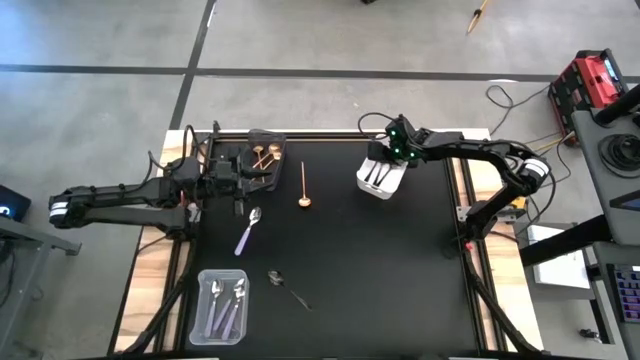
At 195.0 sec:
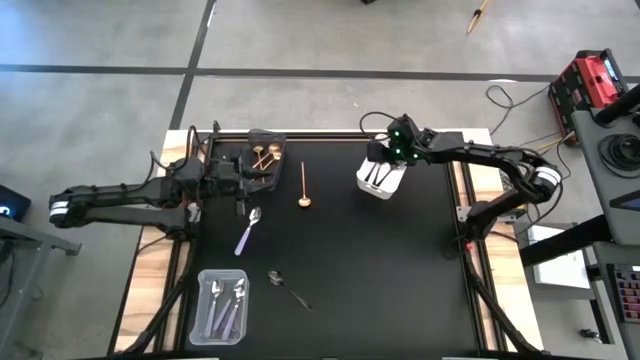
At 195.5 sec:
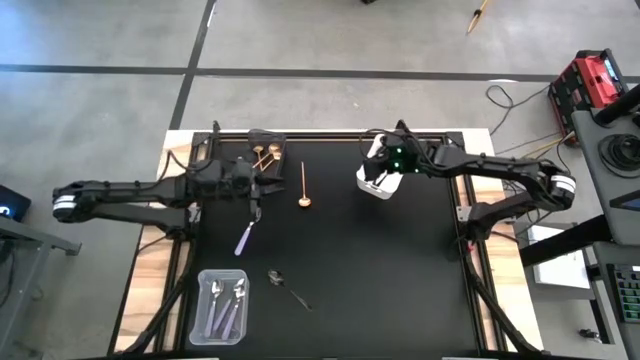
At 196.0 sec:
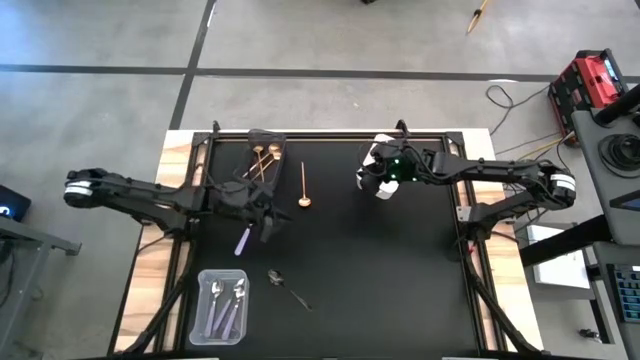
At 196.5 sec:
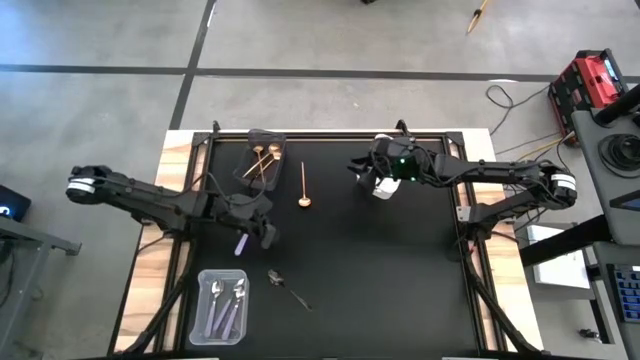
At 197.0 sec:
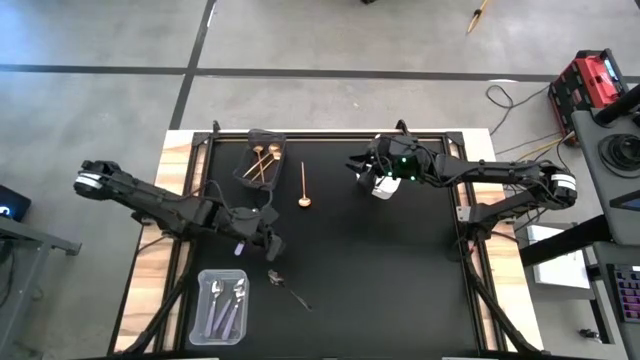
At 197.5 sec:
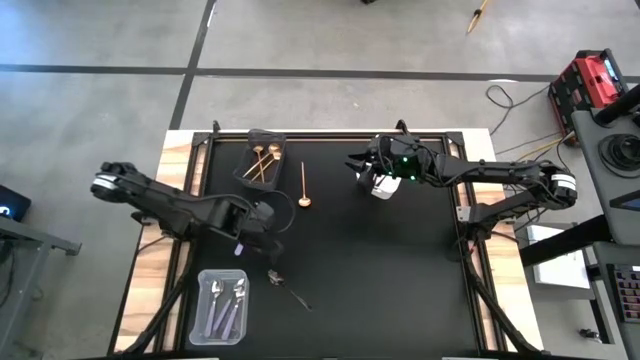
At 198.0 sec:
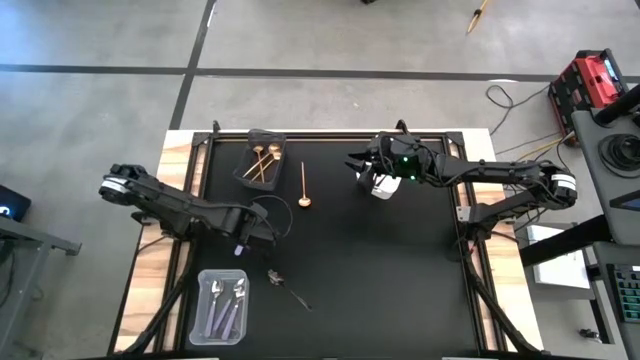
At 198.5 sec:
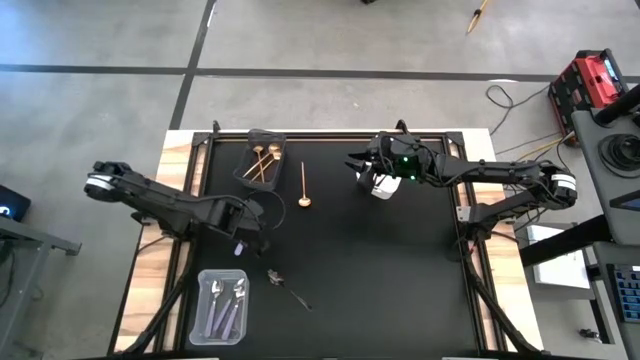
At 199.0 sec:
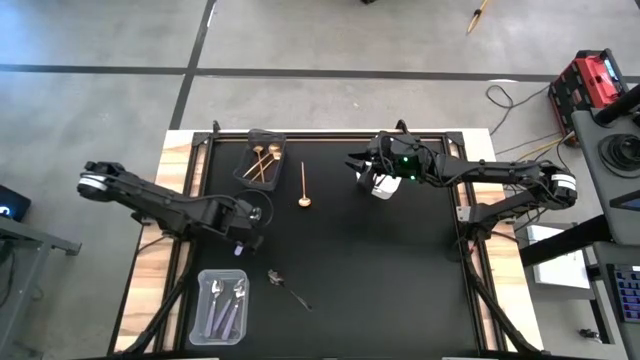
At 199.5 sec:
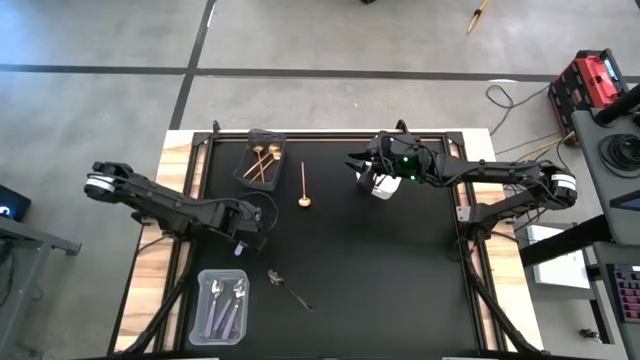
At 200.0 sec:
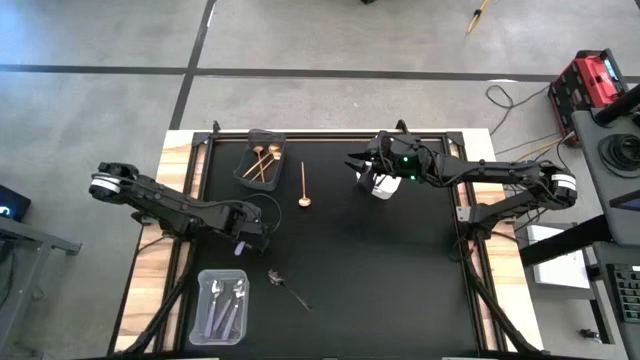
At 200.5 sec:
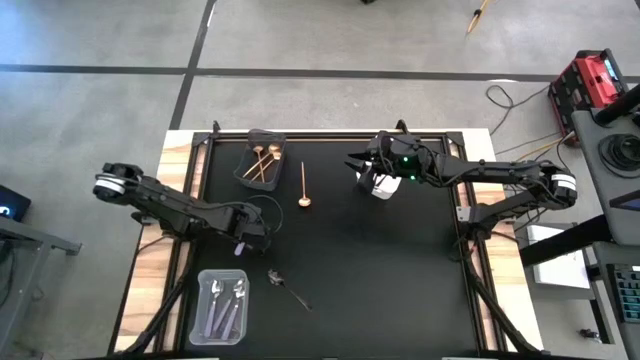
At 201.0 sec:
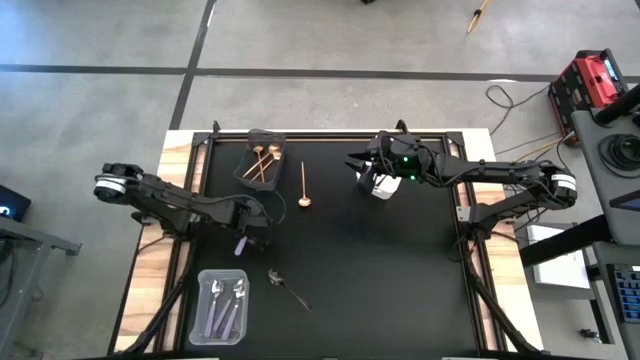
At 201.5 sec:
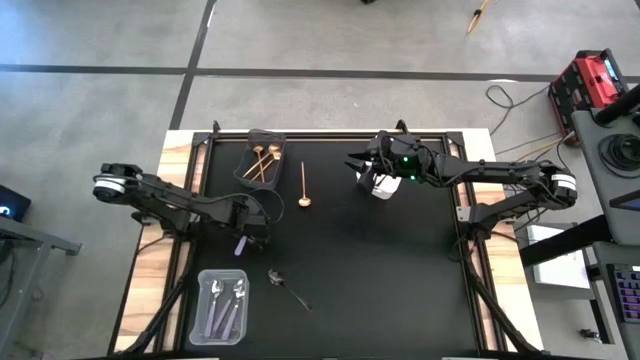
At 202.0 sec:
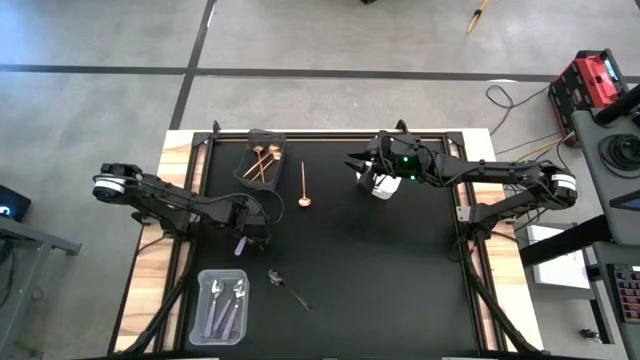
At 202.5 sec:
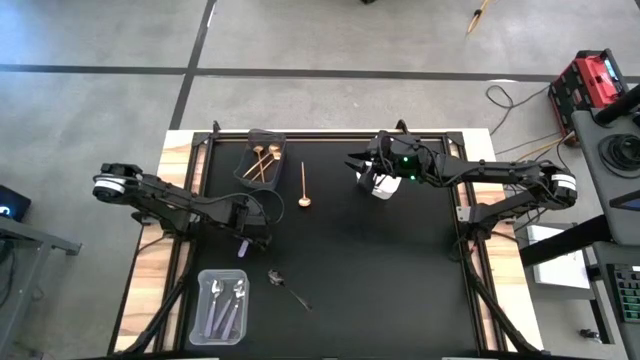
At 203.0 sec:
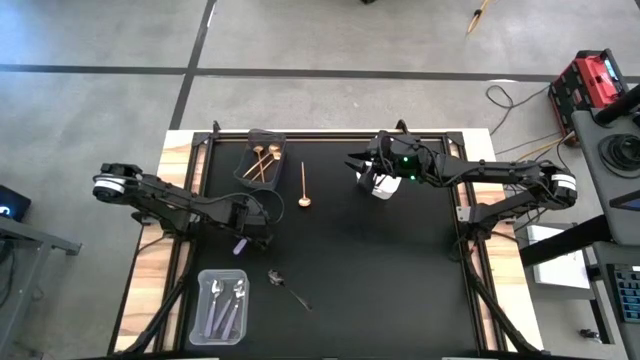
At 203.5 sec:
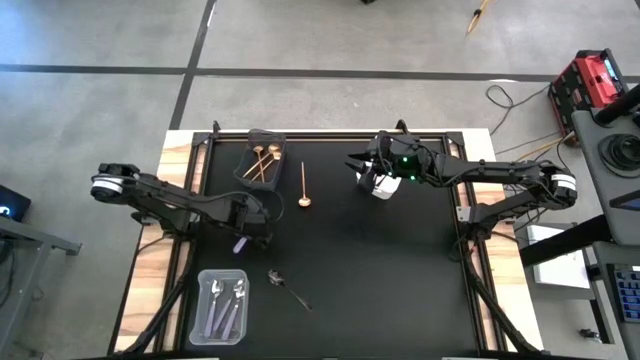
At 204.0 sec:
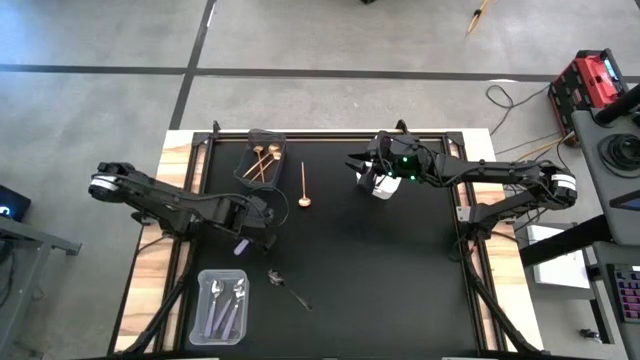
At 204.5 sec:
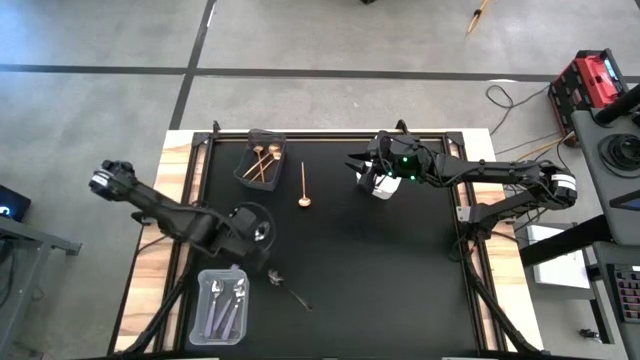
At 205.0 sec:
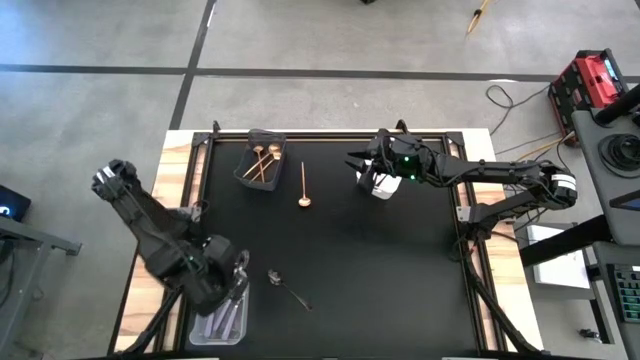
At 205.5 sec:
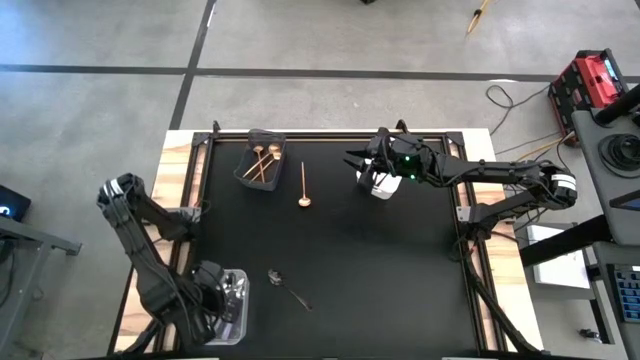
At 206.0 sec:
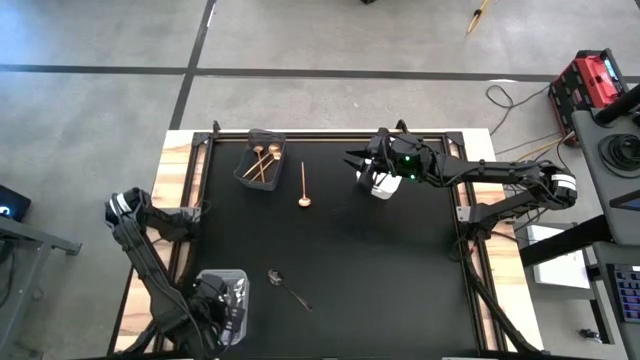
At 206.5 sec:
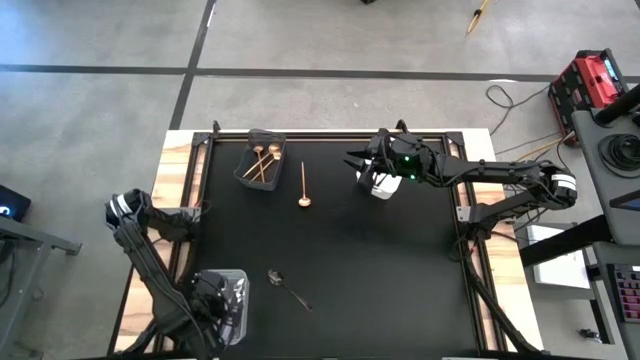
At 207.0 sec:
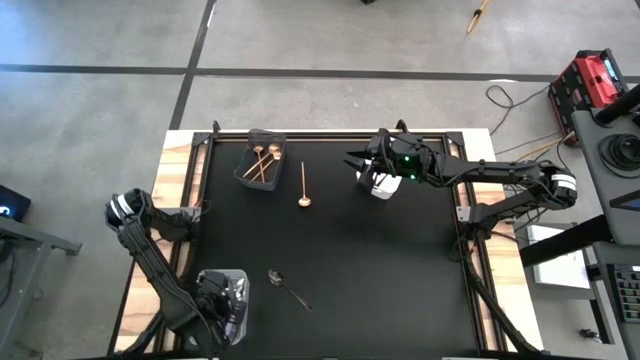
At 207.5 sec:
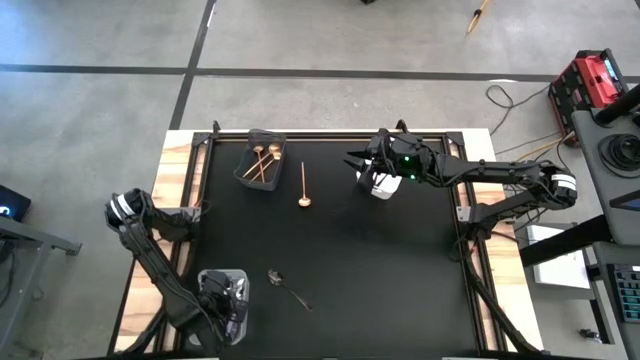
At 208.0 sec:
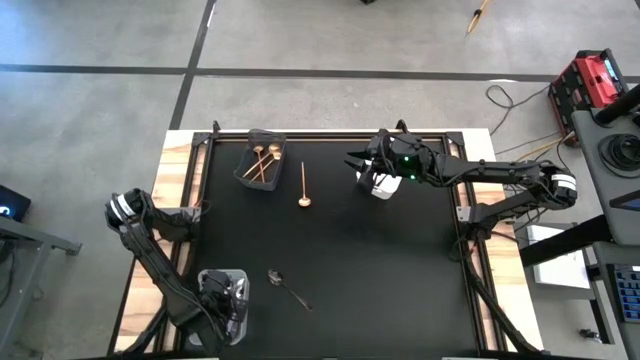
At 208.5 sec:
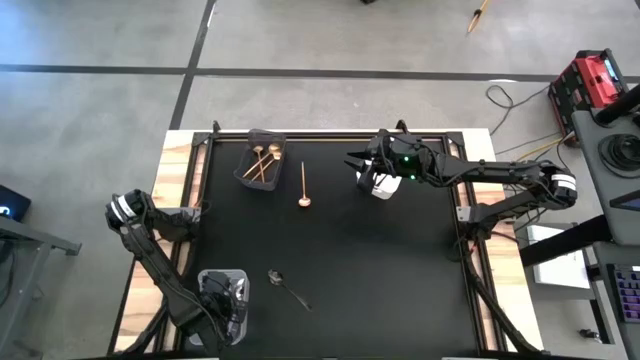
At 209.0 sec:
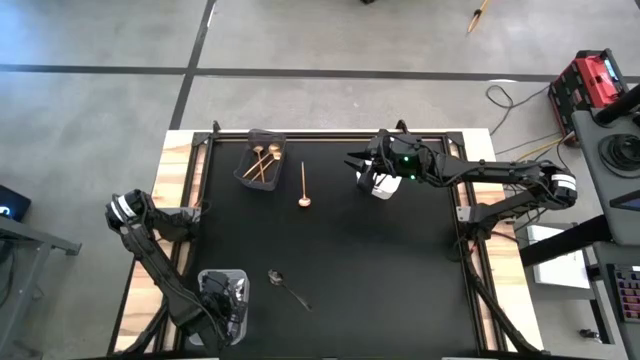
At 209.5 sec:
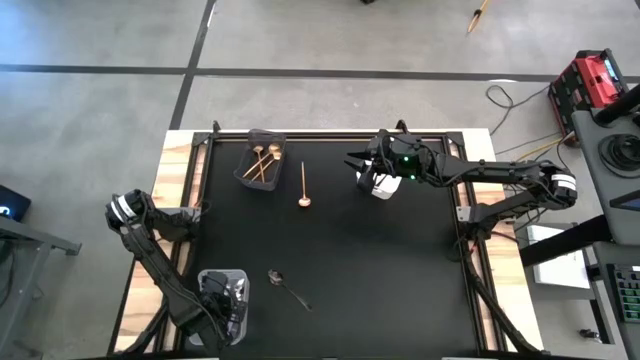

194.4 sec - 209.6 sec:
Task: Sort silverware by color (type)
Put the purple spoon into the transparent bin

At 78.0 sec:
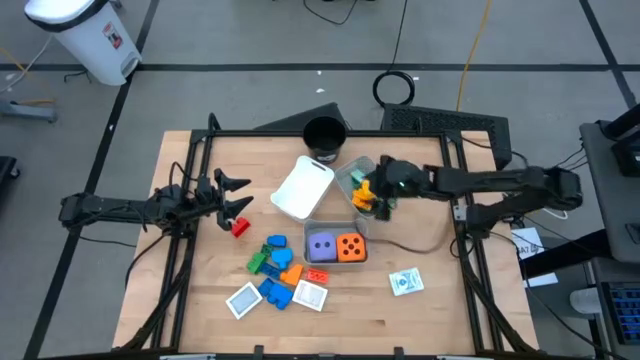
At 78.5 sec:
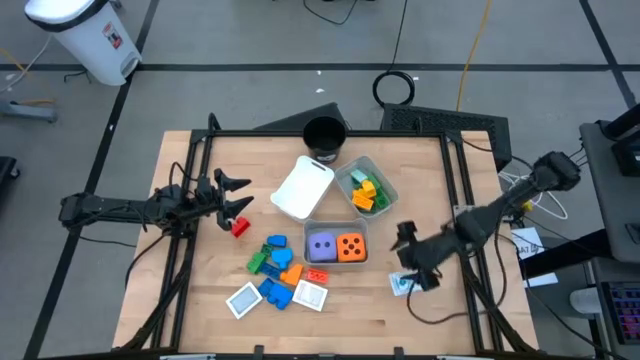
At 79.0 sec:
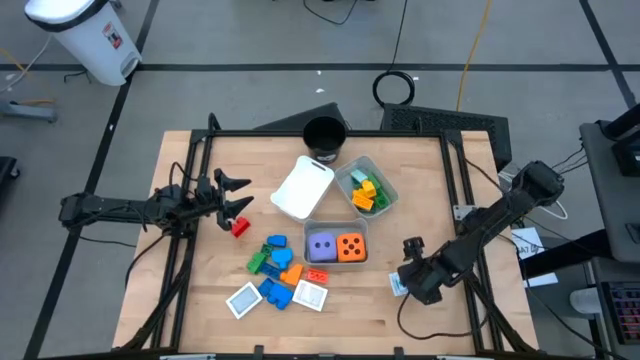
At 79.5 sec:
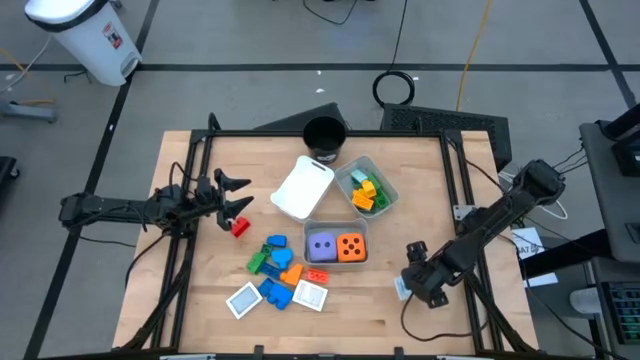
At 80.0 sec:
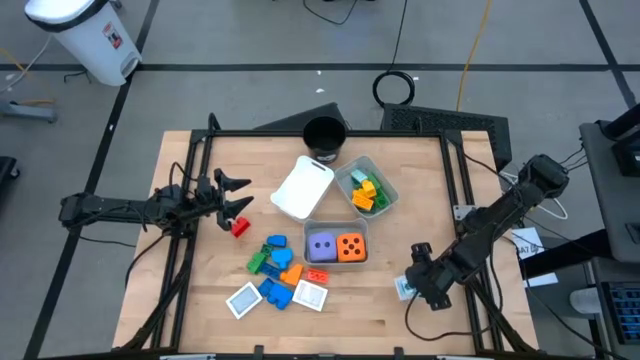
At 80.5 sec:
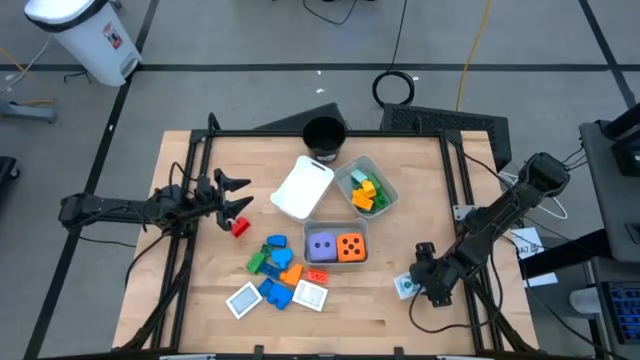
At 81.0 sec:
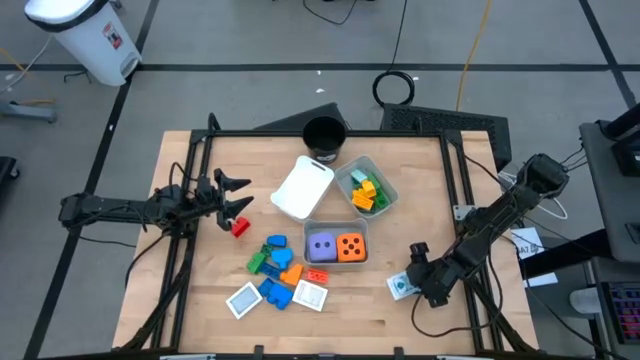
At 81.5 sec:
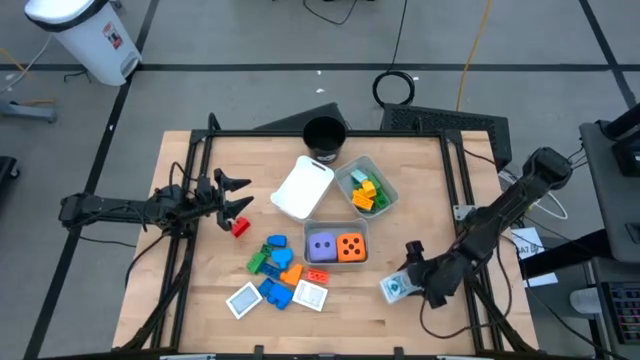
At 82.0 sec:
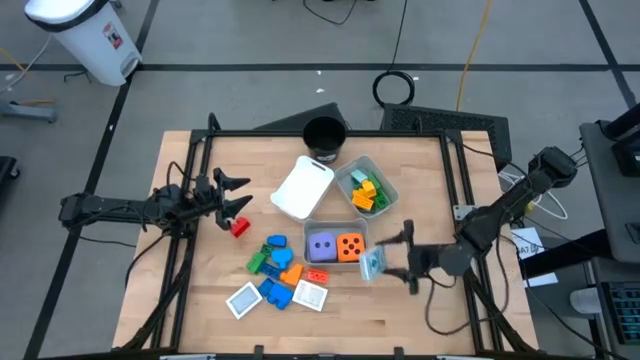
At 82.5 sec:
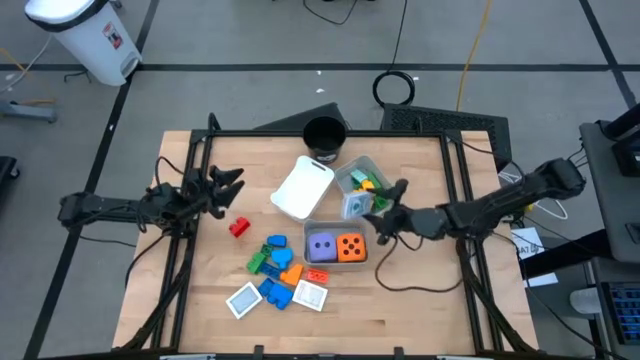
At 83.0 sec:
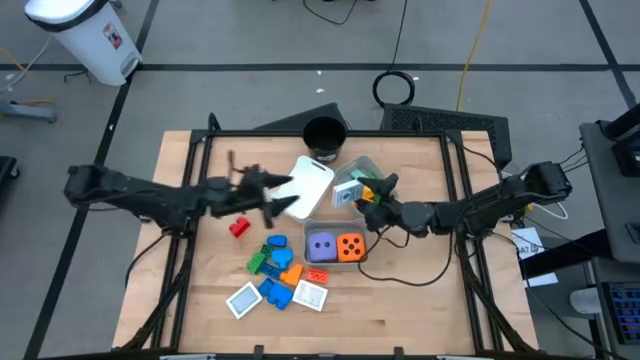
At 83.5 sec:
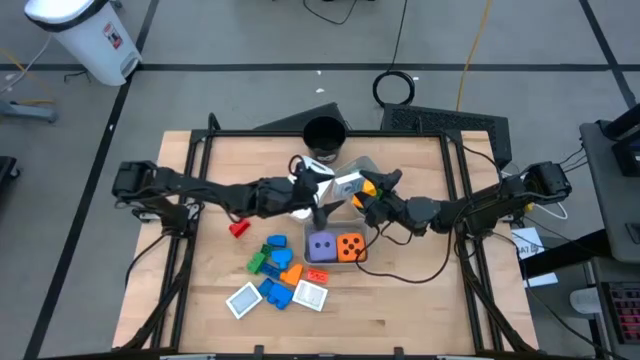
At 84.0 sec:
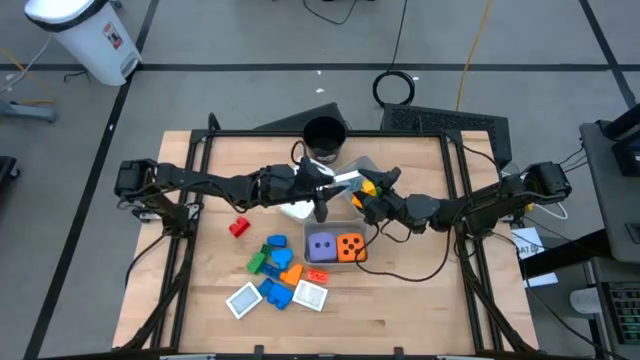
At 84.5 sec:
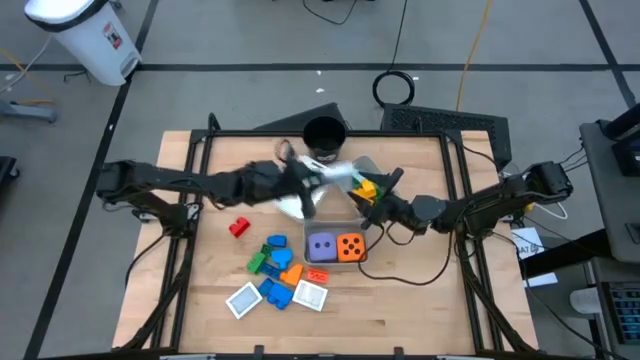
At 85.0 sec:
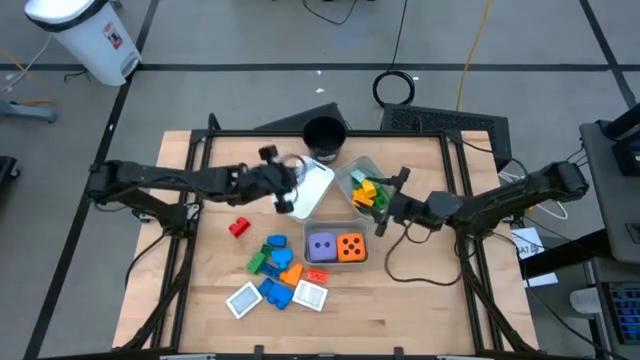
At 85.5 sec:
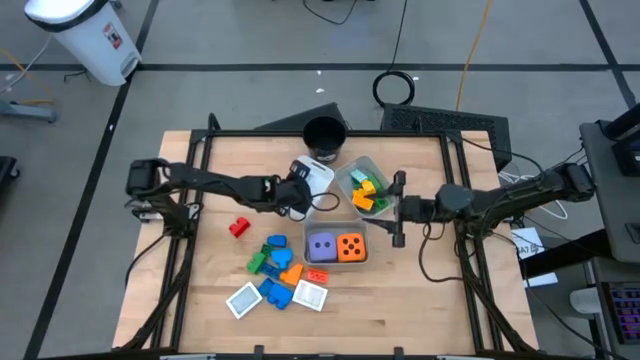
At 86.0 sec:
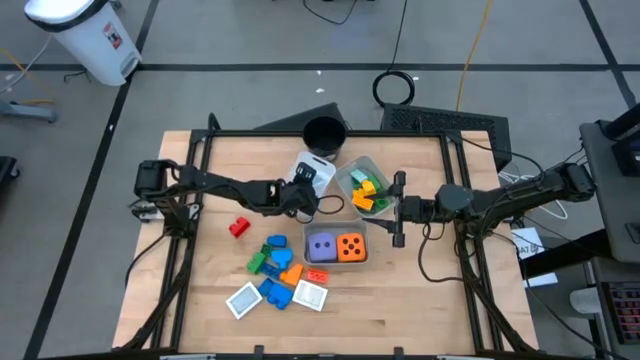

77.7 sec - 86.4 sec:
Task: Pick & Place Toys
Put the blue deck of cards into the white bin
